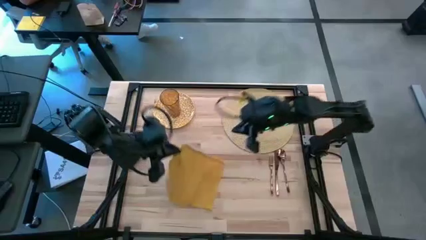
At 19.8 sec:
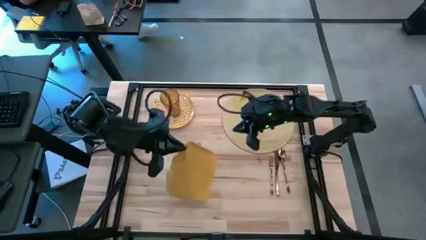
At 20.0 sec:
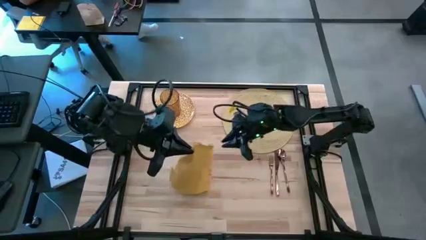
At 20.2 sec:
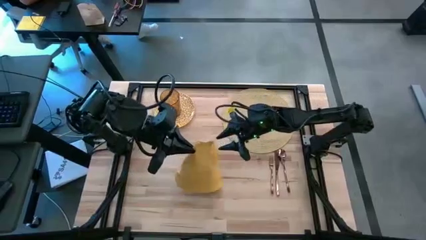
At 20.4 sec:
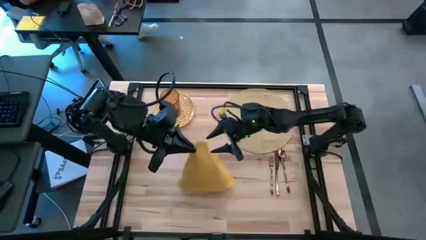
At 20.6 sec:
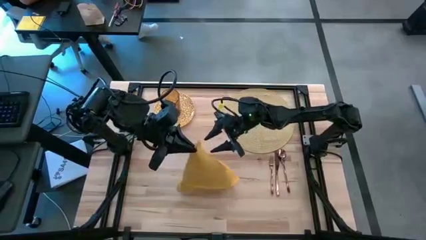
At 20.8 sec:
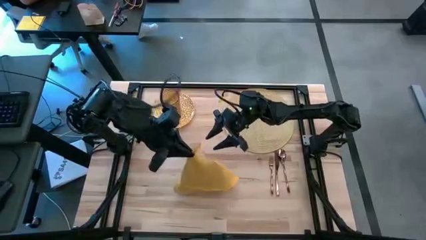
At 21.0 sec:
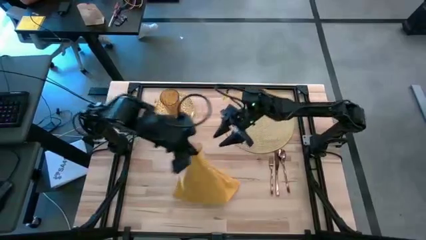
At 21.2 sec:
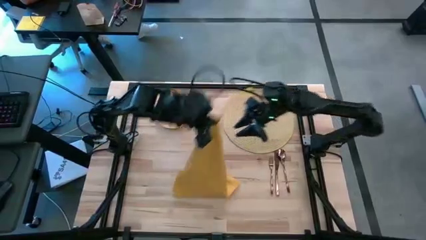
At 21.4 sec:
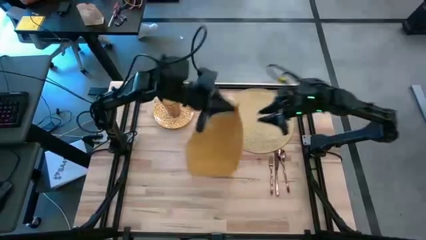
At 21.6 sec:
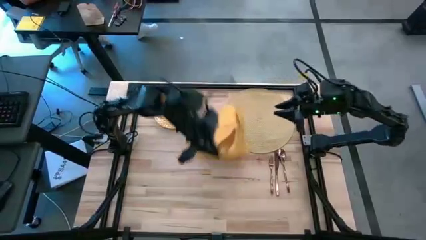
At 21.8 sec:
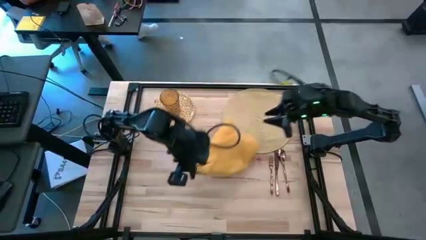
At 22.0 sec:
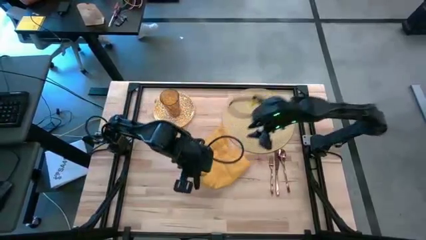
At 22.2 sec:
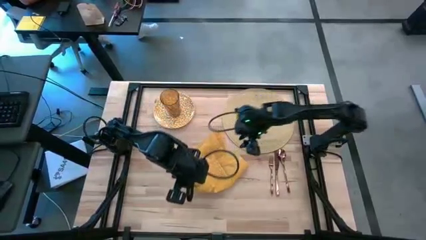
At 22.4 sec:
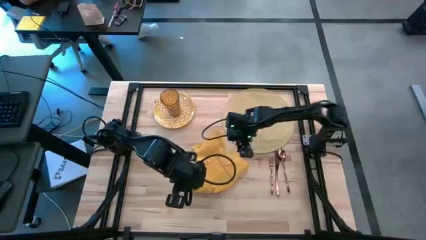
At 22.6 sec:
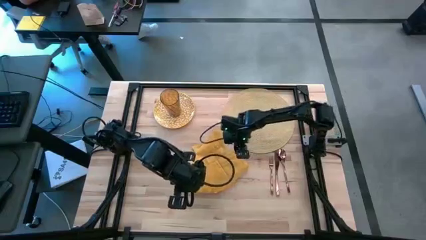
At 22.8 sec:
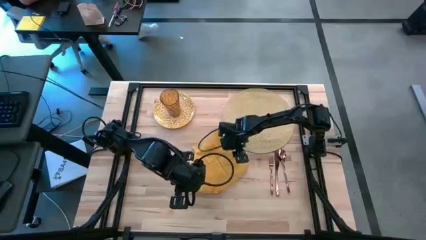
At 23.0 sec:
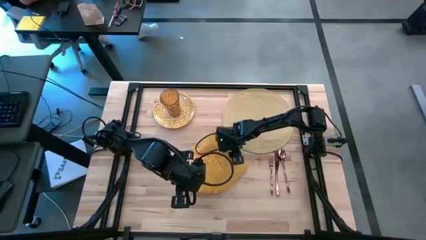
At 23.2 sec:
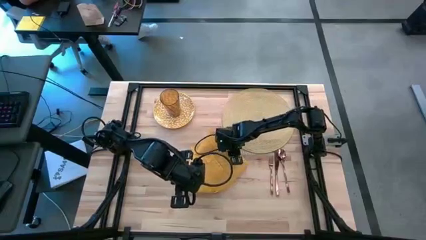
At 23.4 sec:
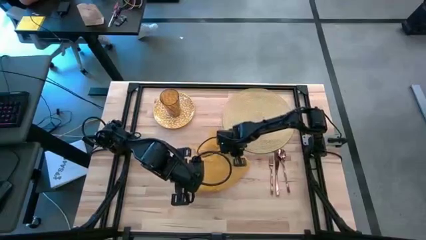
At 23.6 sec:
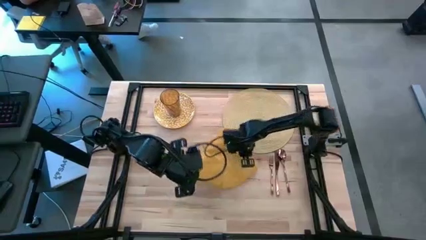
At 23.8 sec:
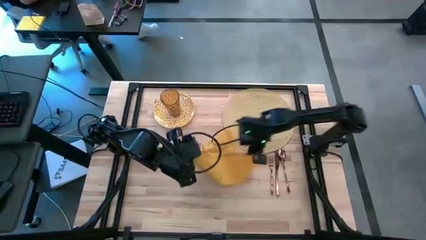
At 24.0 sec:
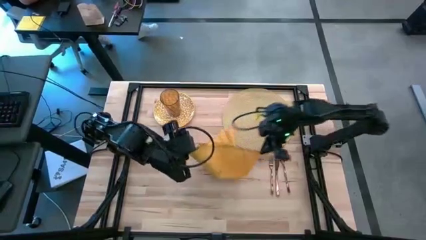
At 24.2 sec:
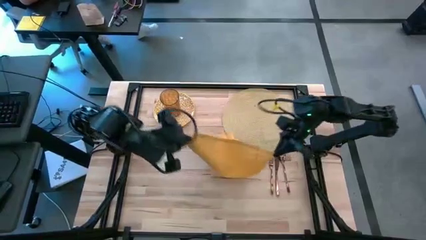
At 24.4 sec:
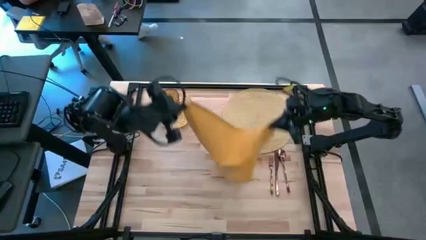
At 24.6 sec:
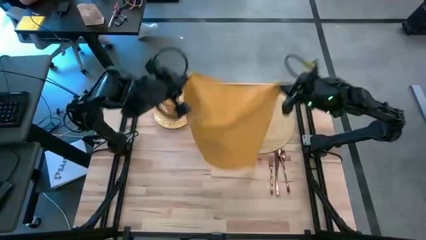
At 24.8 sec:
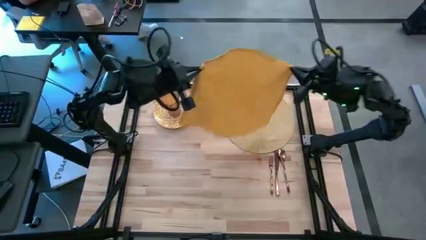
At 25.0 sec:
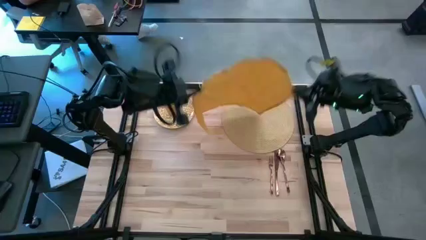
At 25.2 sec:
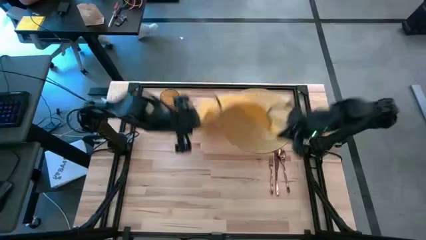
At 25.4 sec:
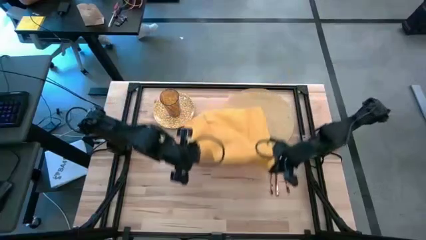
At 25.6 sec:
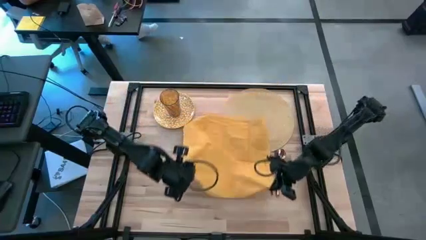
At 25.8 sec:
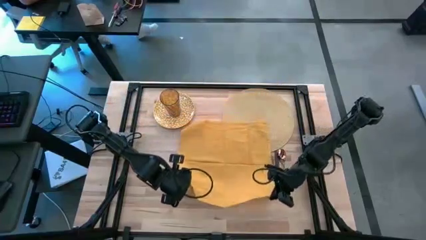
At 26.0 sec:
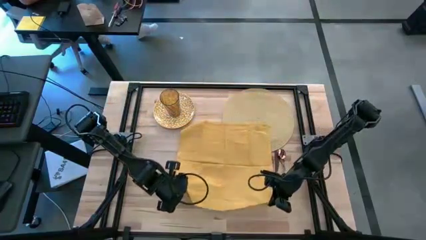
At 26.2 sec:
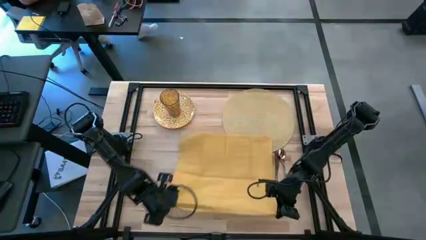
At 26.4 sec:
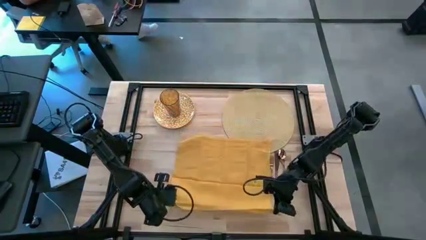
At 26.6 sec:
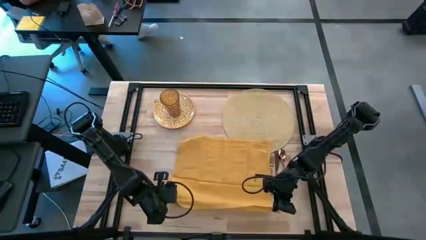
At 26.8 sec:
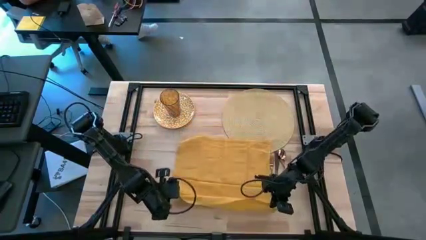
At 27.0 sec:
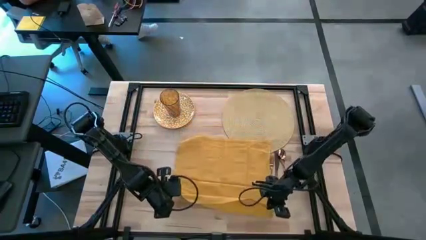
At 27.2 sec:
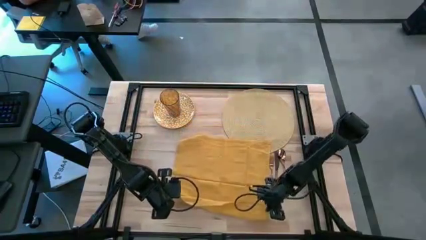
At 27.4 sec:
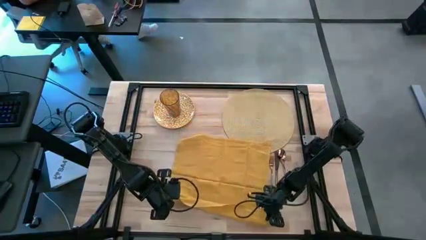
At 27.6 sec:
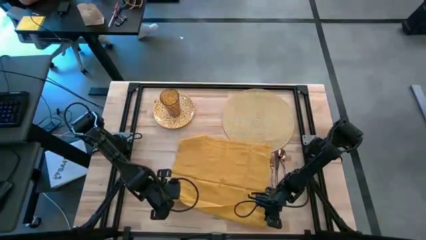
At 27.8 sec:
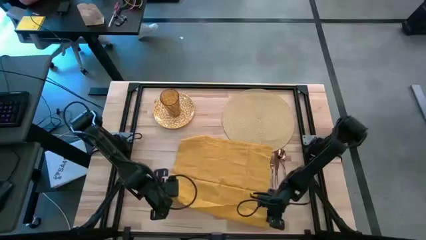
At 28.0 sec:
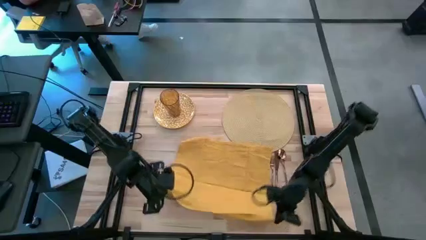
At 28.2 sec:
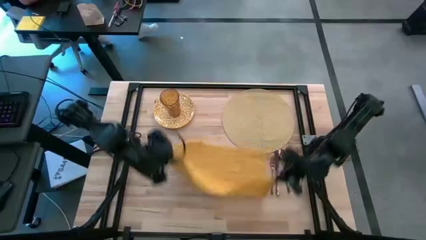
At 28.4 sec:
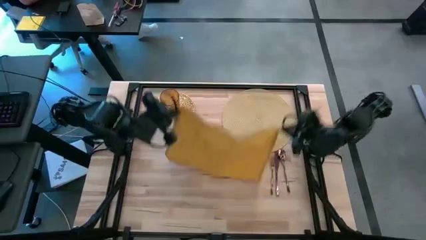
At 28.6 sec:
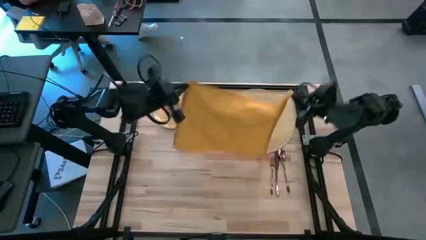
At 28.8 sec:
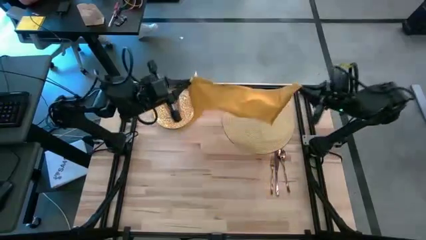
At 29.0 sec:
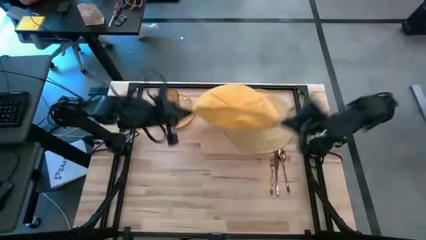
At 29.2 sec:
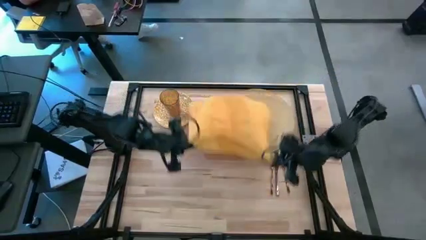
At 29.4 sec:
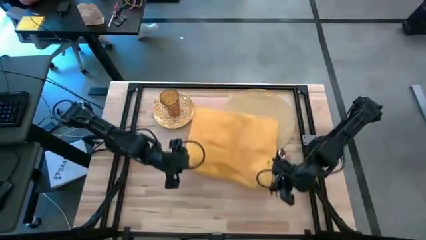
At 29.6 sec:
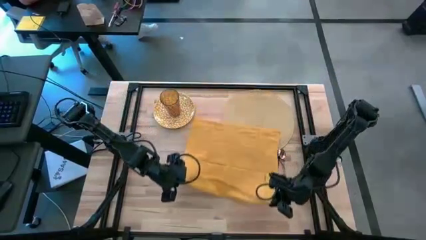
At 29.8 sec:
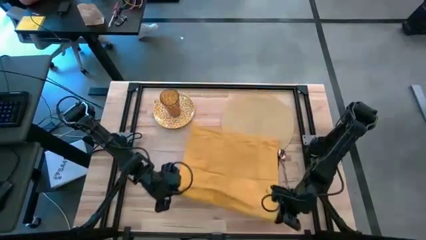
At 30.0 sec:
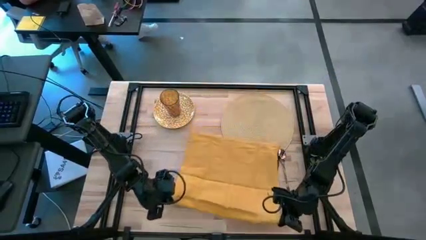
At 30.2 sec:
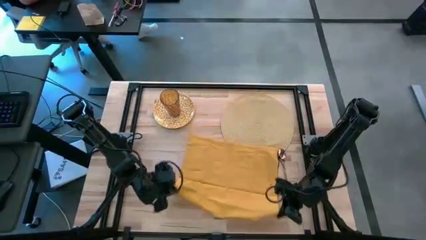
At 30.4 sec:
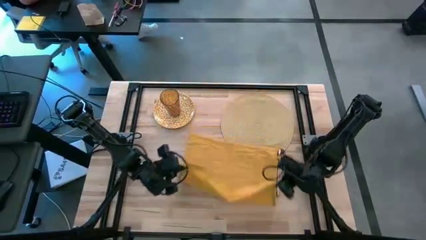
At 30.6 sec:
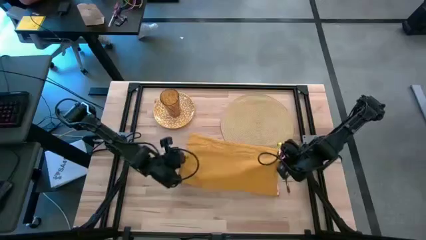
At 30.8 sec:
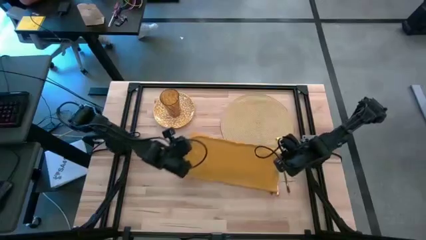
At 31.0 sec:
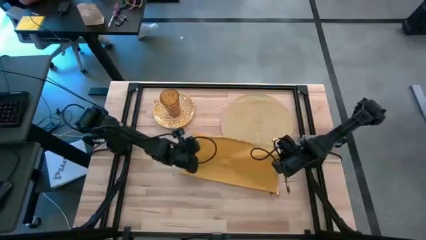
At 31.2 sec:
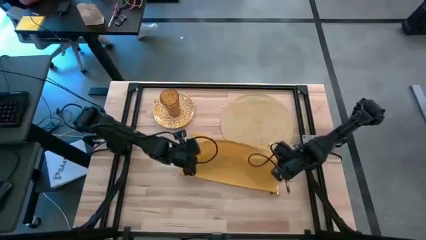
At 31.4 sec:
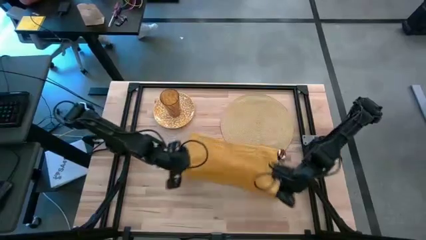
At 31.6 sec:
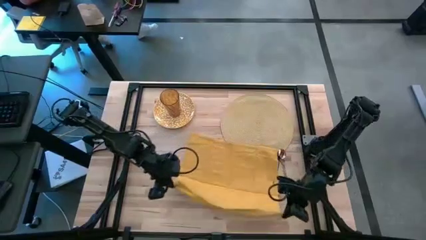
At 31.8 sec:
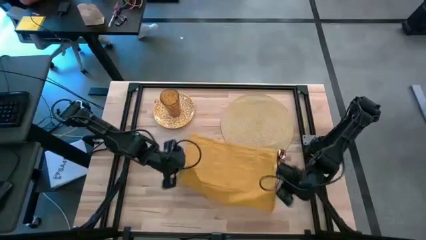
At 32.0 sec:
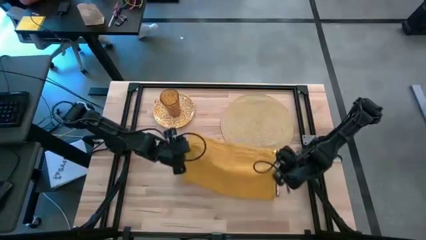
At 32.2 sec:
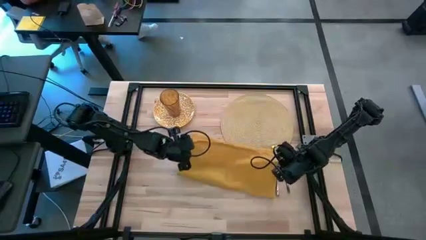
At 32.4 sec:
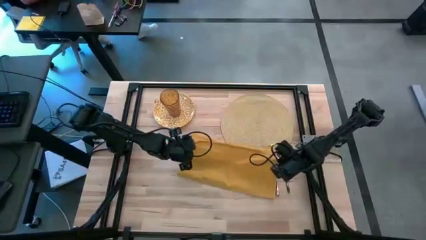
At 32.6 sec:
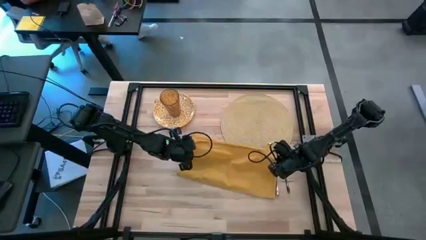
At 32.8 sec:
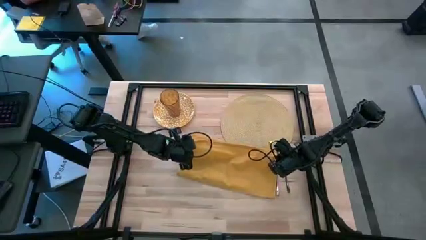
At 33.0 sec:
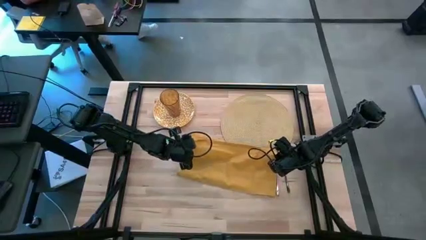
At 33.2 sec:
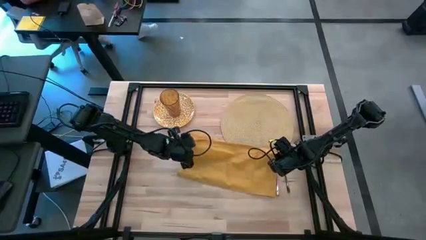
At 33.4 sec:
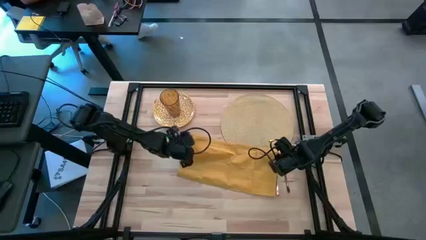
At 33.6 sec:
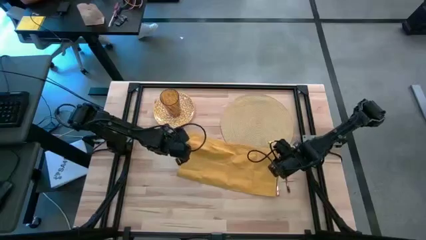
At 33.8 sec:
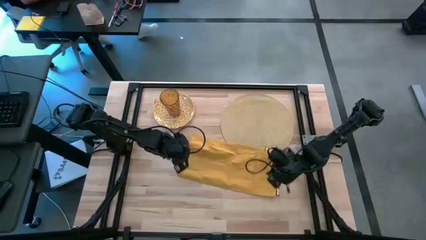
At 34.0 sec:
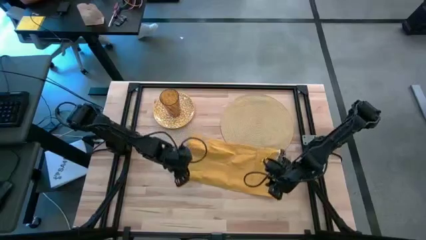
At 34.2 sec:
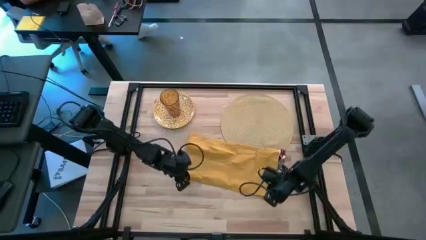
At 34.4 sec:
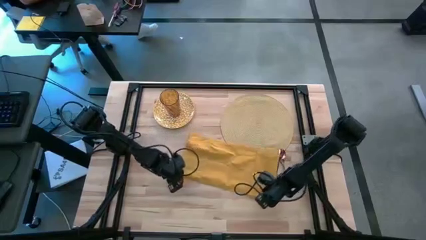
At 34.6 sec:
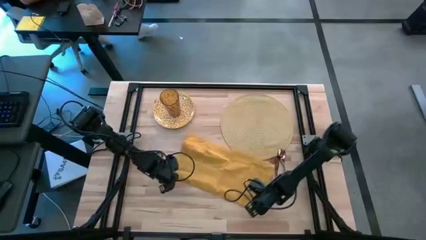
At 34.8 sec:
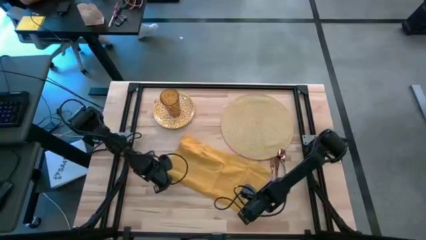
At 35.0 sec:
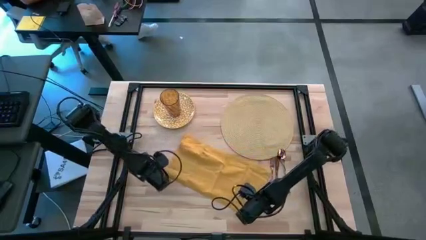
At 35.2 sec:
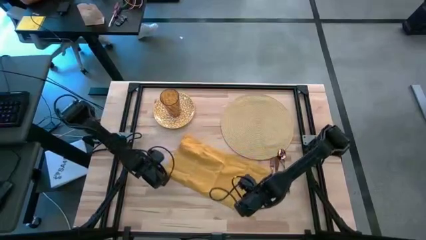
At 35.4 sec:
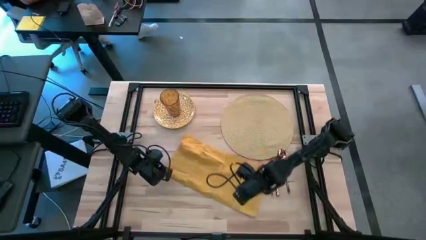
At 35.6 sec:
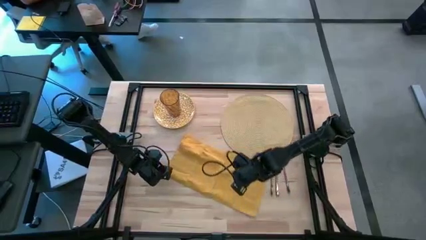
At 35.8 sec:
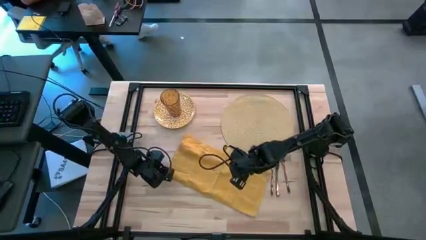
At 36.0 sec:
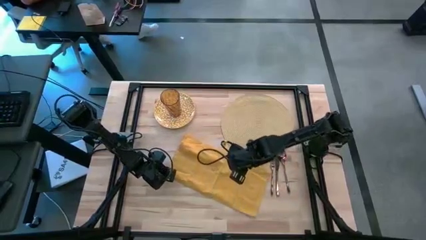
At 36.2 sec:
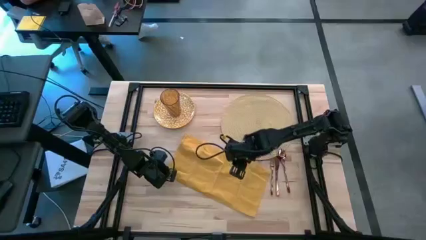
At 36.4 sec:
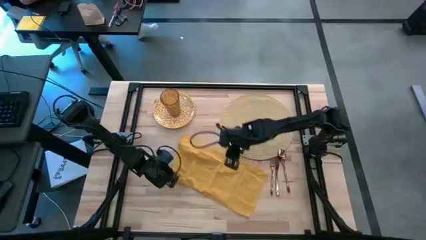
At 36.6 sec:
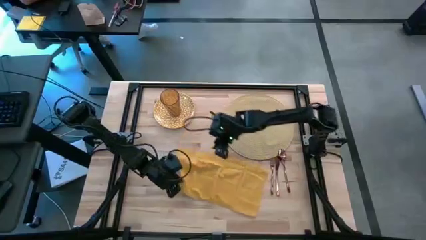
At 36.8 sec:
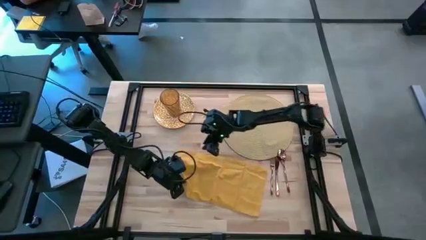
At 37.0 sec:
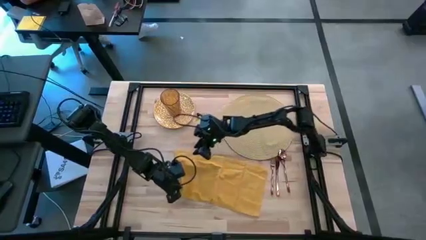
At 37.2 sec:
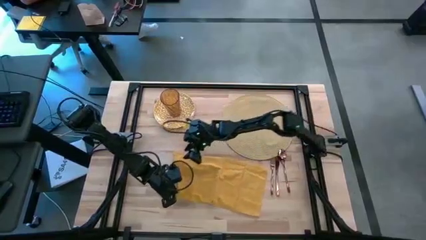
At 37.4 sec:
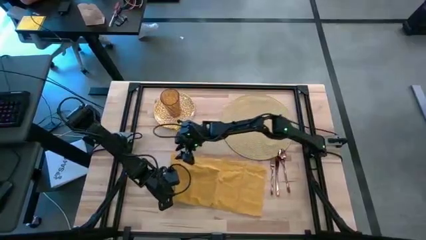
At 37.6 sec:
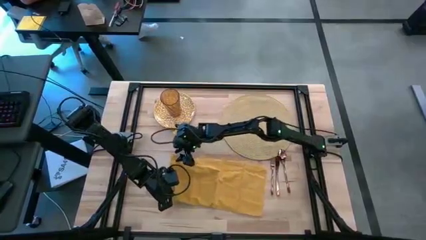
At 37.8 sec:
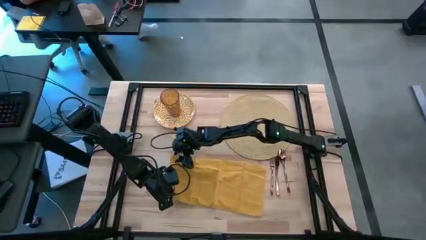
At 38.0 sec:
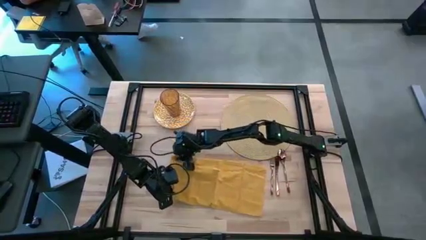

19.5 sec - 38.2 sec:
Task: Set table place
Fold the yellow table napkin
